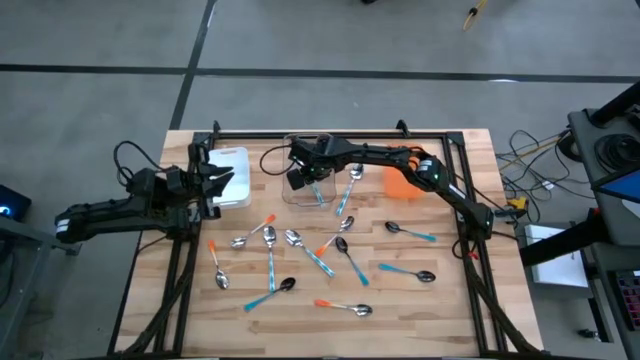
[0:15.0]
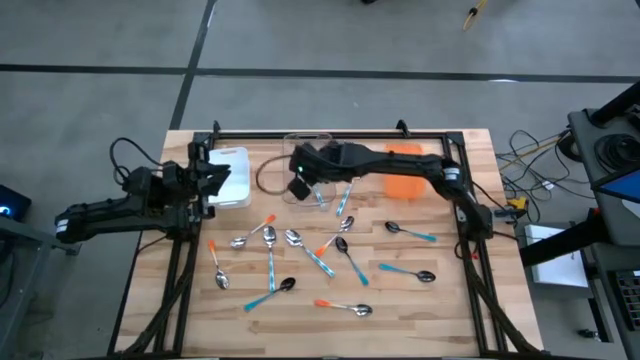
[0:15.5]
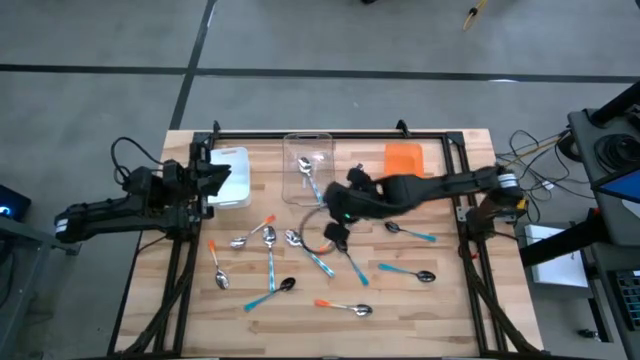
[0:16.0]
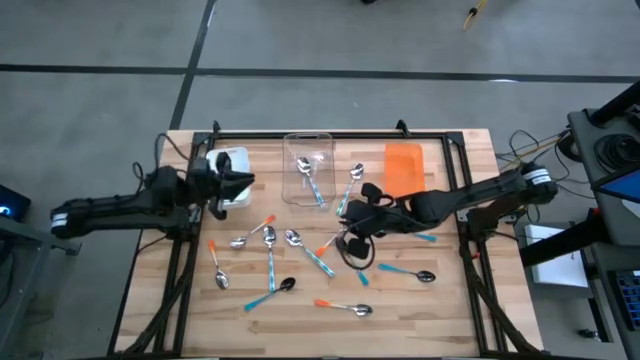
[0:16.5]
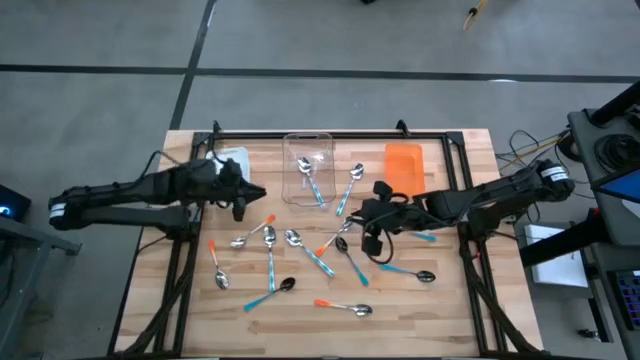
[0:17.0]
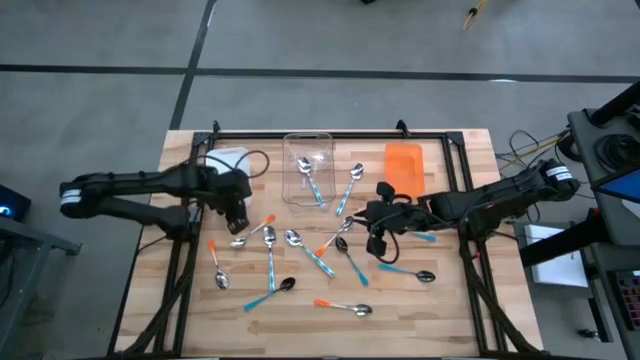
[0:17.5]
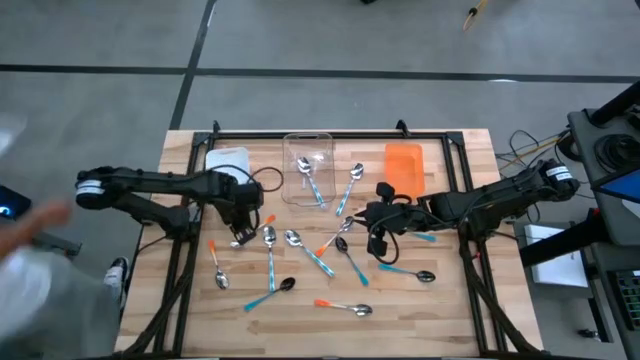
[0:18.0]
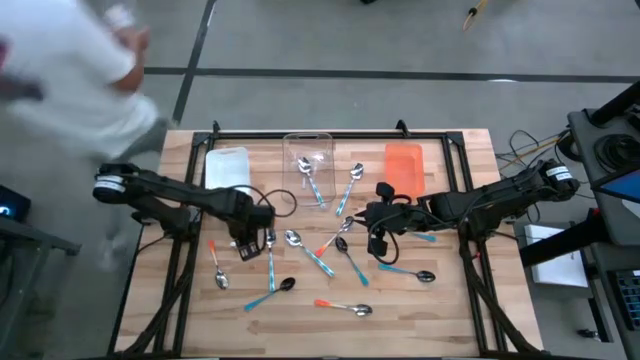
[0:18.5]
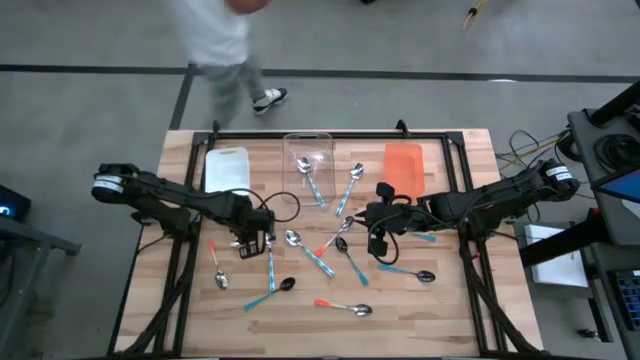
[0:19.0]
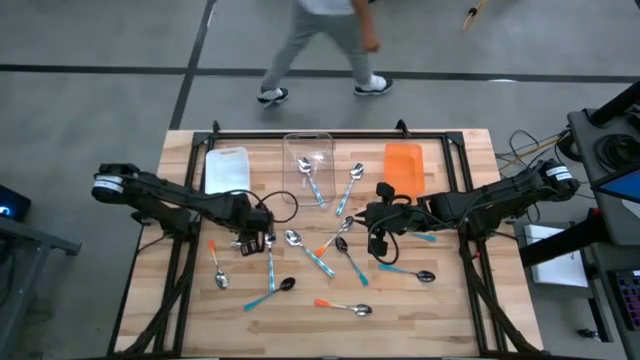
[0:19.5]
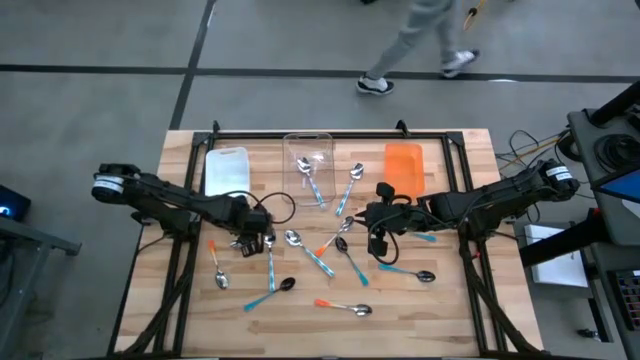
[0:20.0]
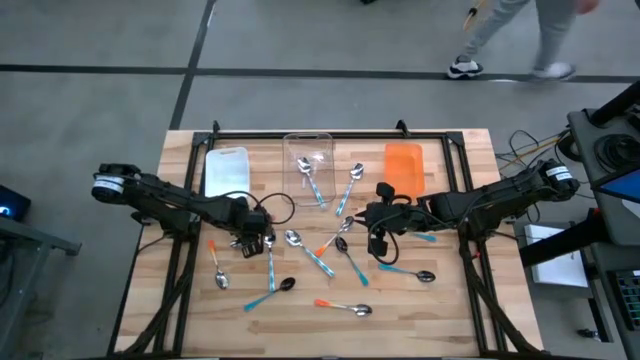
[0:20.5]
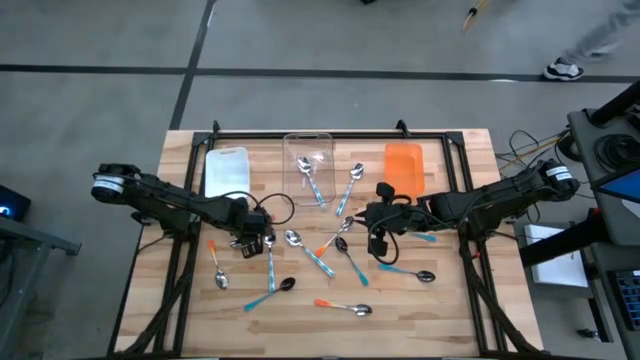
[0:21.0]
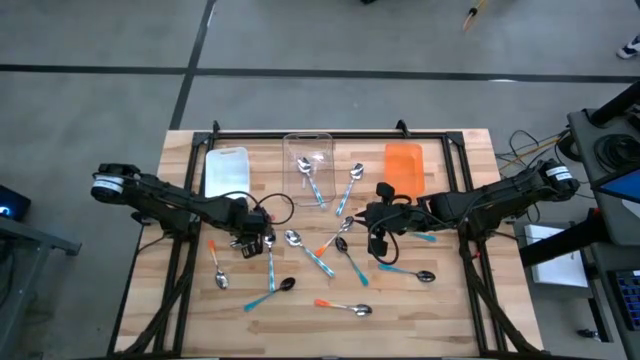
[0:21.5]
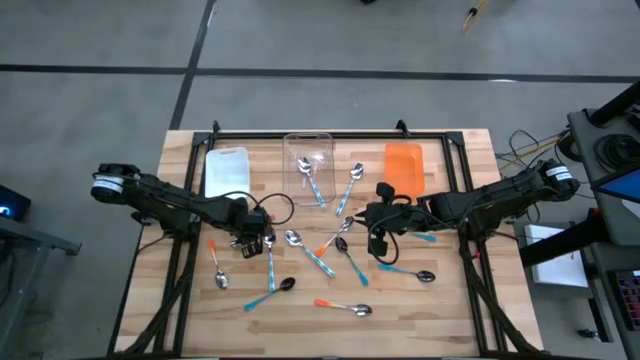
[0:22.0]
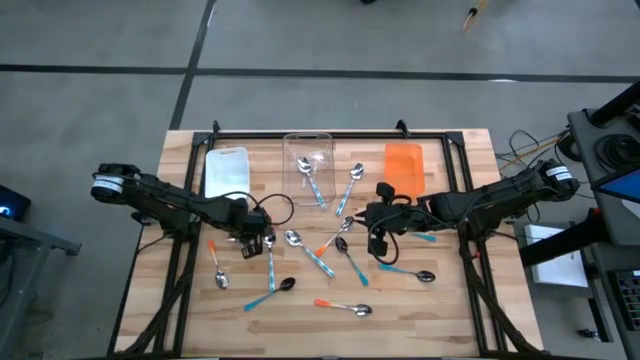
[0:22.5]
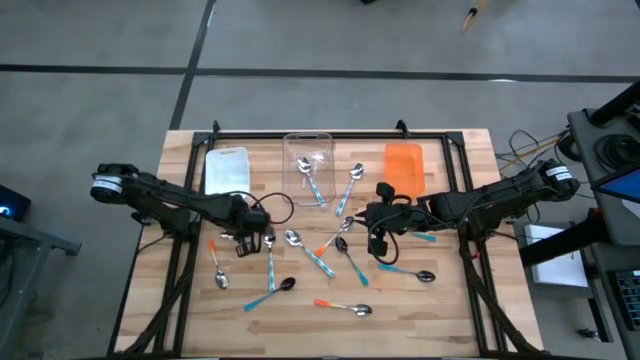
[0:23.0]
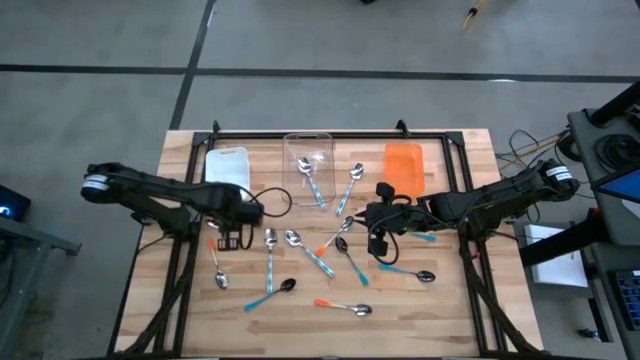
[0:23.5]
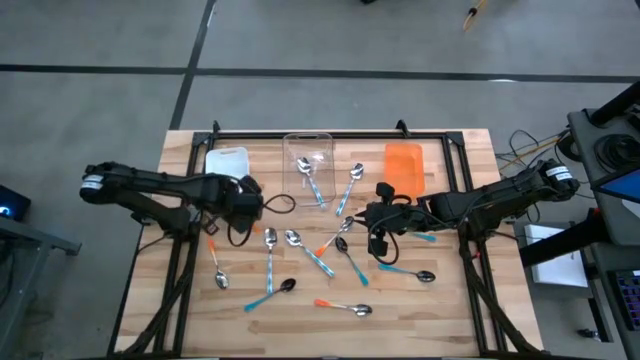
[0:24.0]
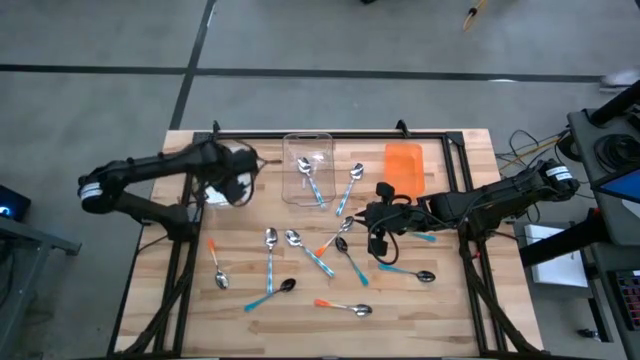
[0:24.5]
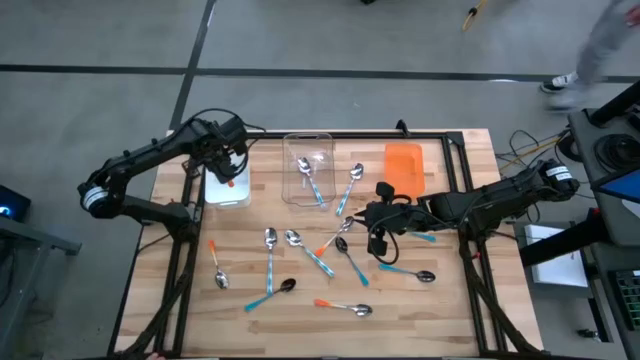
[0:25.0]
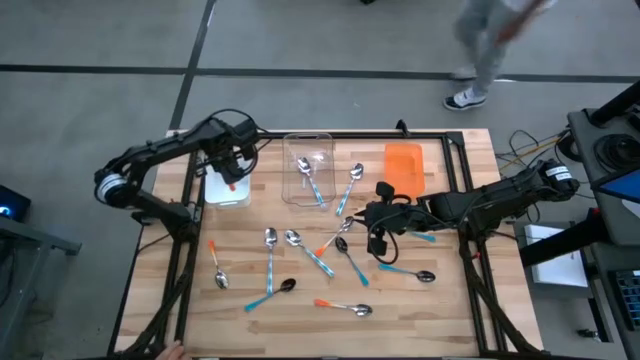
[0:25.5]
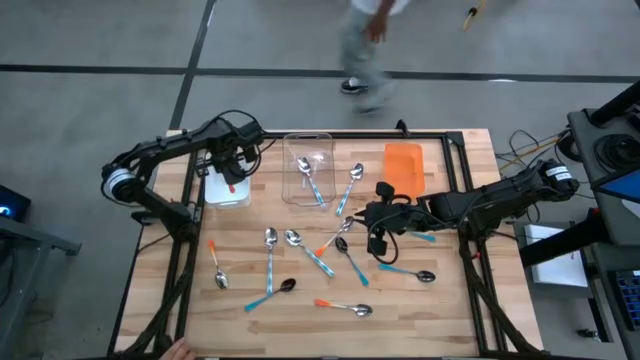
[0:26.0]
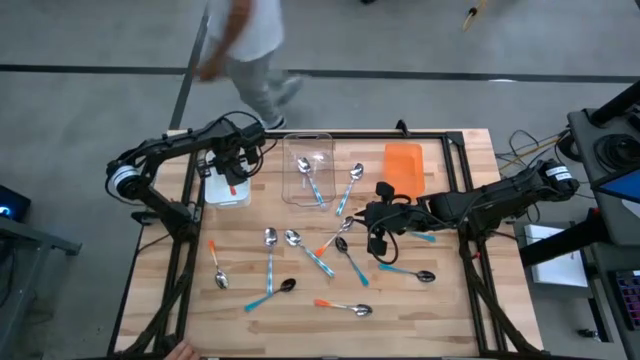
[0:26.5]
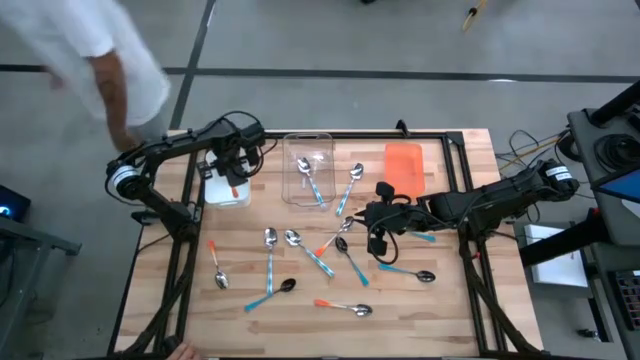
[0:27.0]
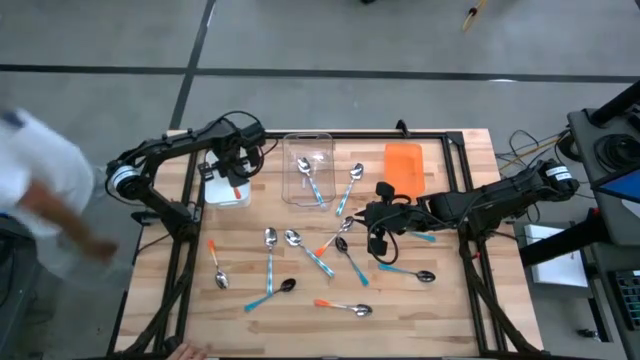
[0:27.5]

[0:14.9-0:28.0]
Task: Sort silverware by color (type)
Put the orange spoon into the white bin

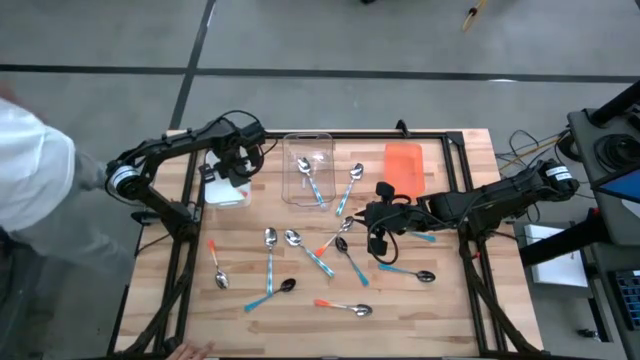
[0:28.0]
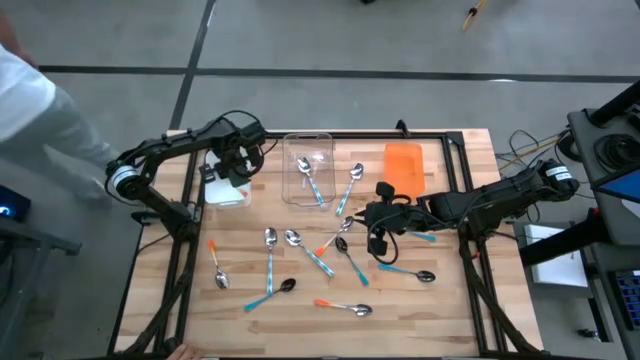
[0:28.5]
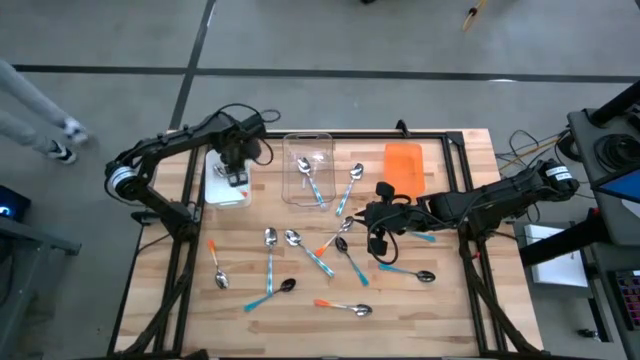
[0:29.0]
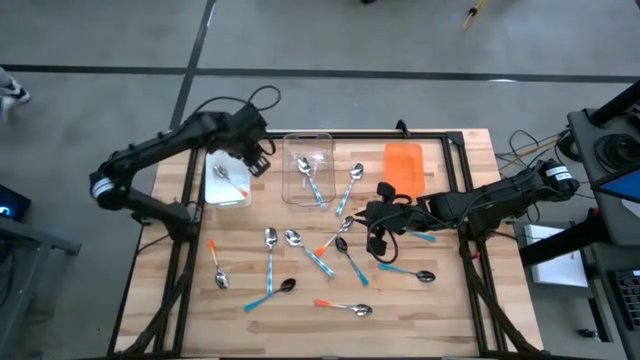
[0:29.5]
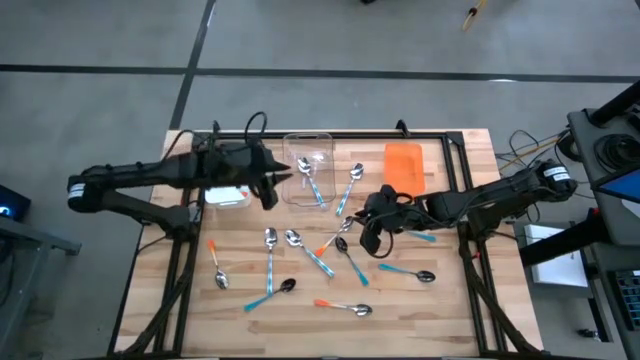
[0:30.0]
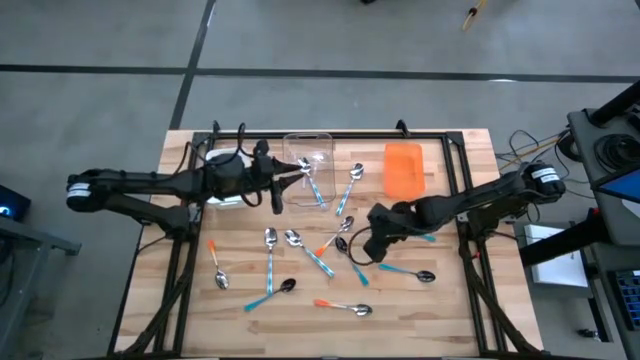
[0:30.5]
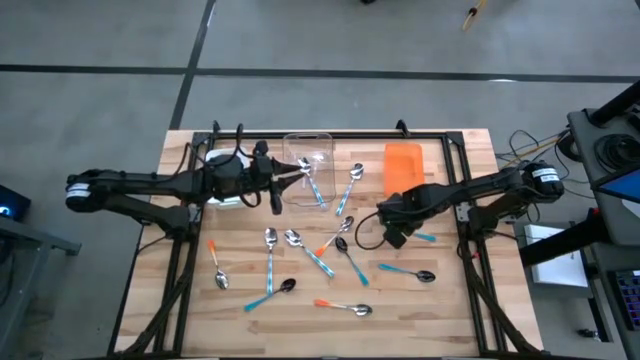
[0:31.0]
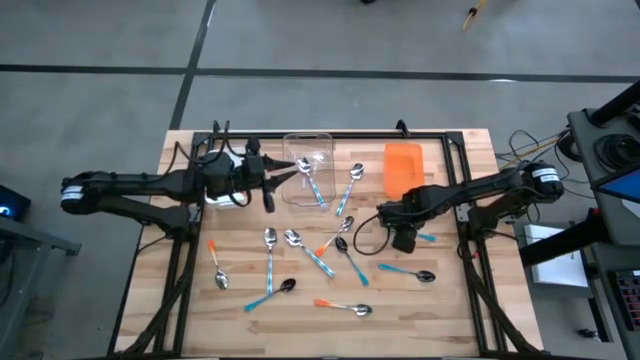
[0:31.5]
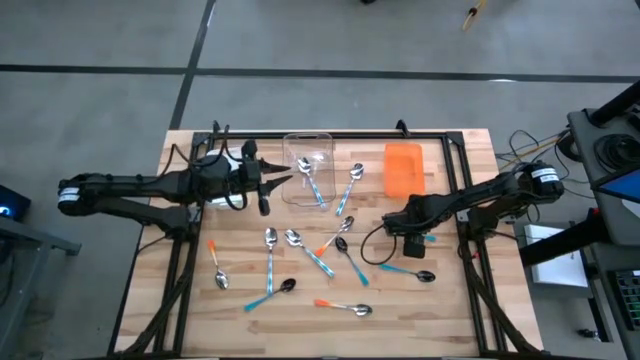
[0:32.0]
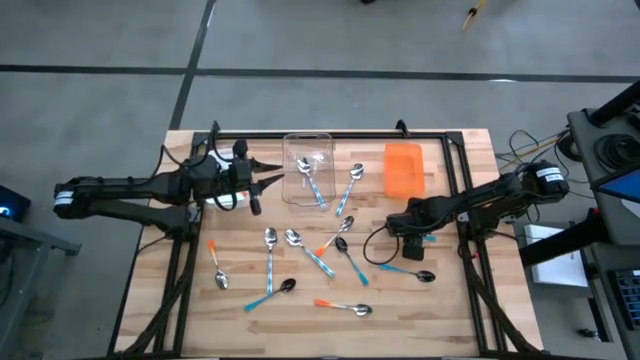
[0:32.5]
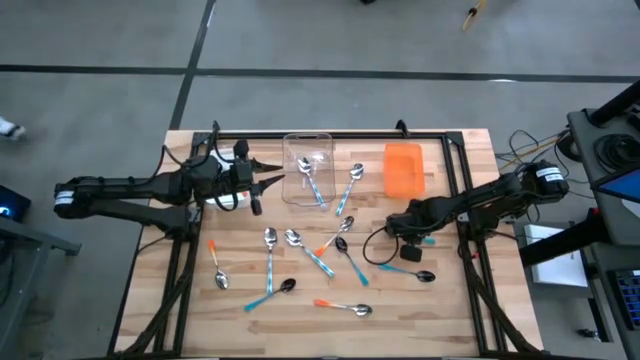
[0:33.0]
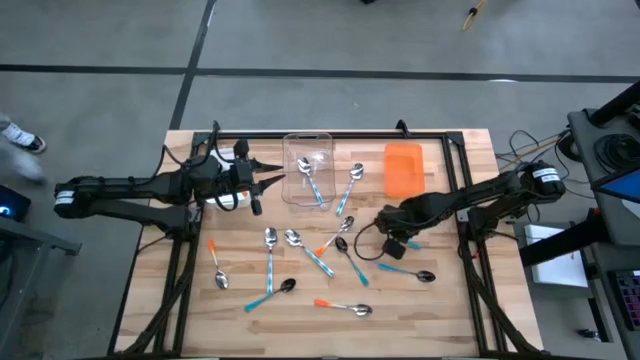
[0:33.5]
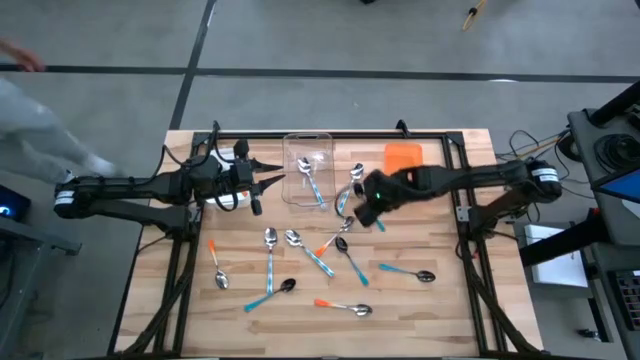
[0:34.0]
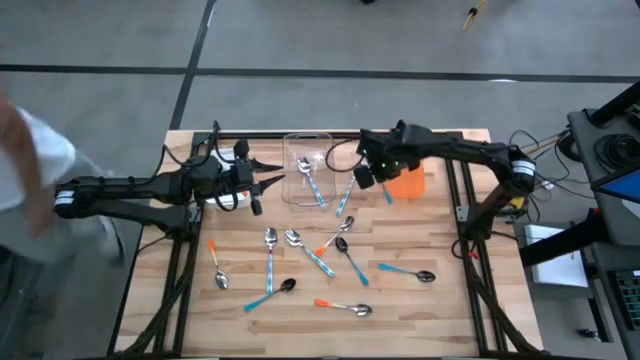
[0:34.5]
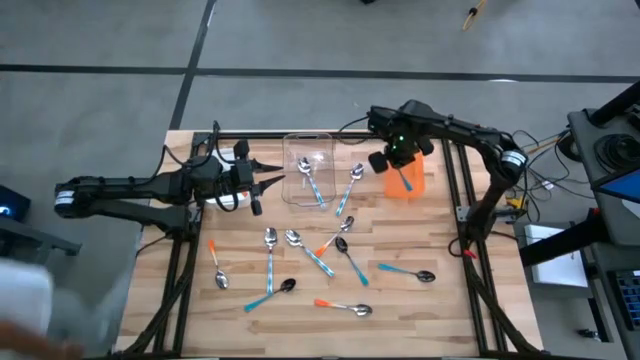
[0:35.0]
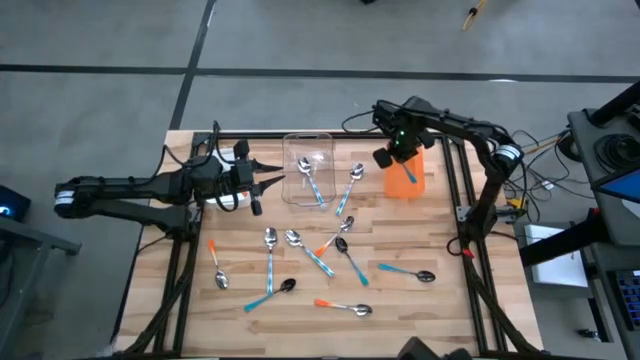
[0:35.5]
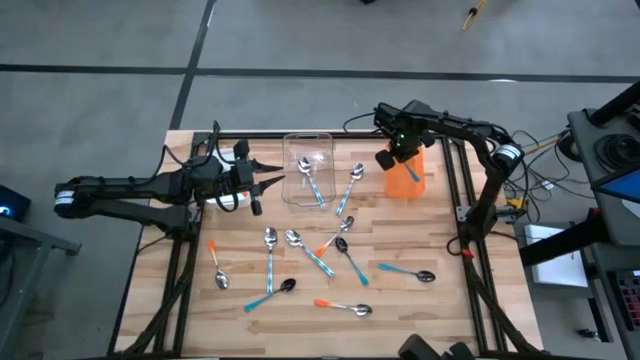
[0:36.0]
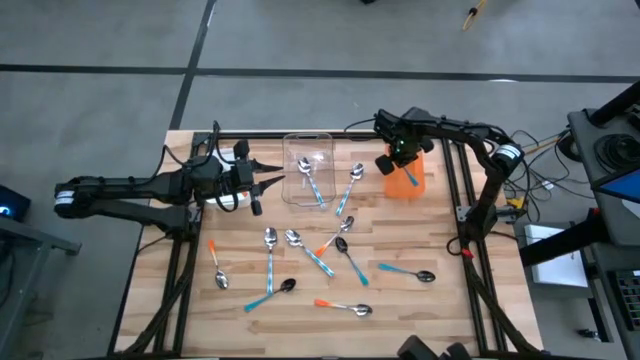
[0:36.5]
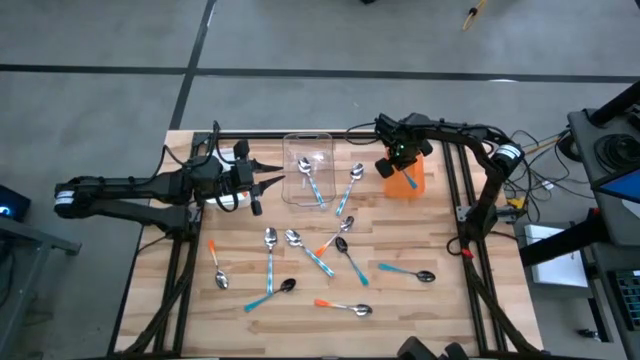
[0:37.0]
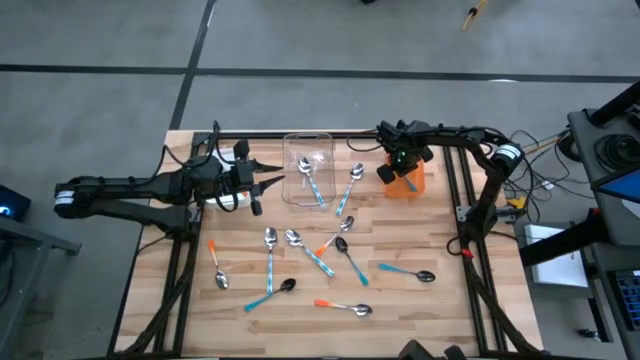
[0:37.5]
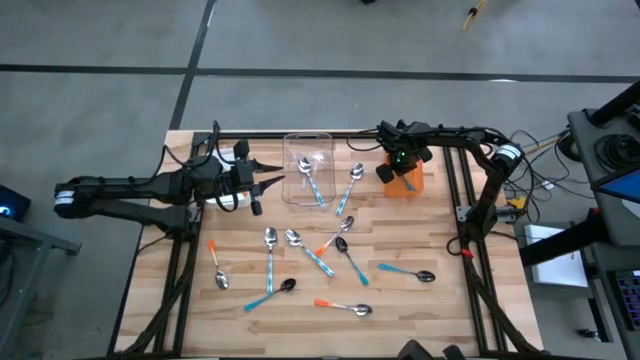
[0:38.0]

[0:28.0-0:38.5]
Put the blue spoon into the orange bin
